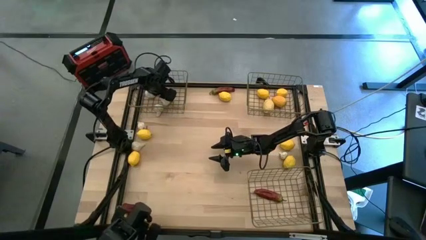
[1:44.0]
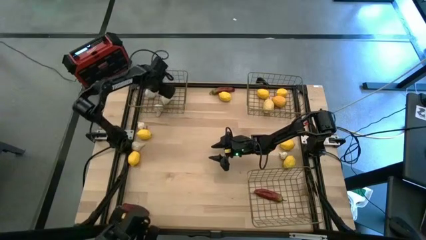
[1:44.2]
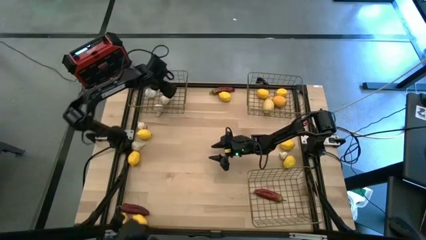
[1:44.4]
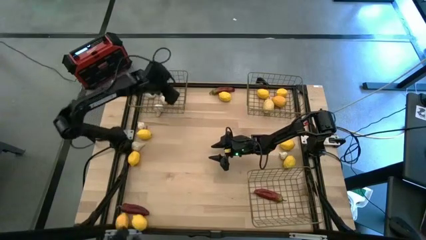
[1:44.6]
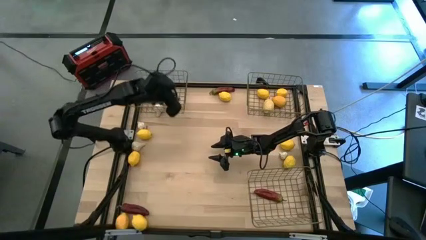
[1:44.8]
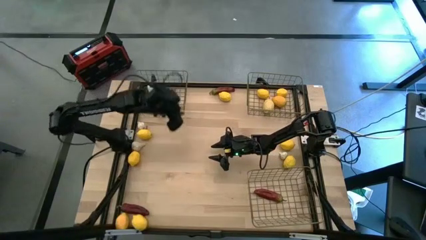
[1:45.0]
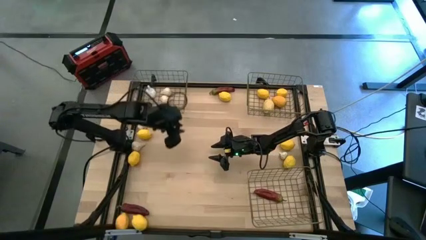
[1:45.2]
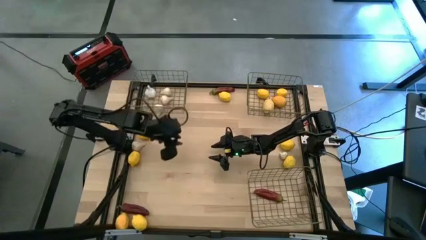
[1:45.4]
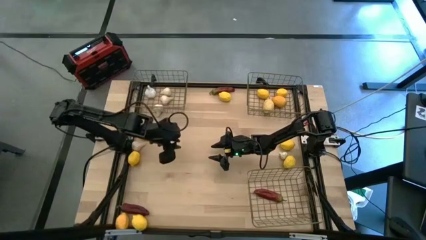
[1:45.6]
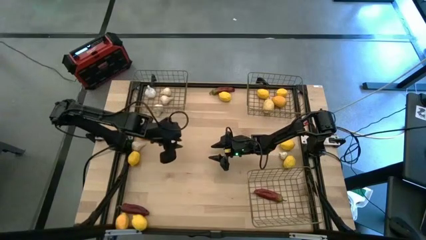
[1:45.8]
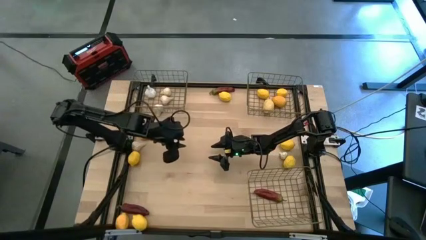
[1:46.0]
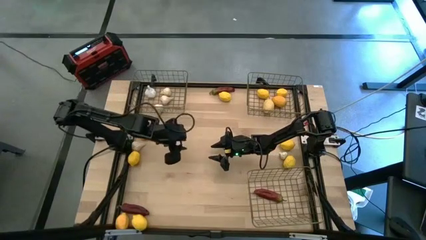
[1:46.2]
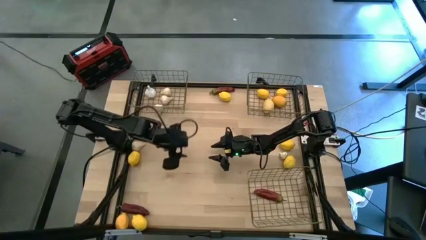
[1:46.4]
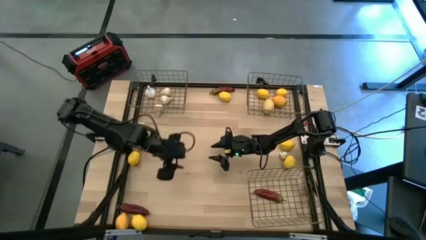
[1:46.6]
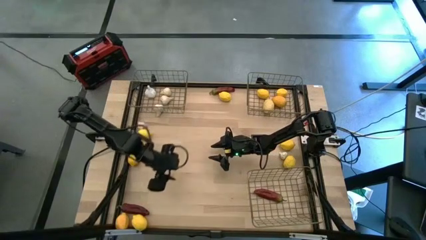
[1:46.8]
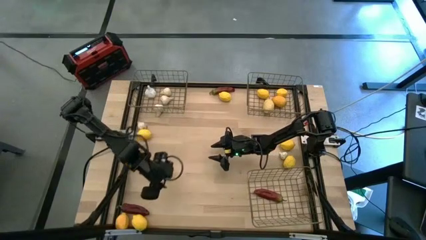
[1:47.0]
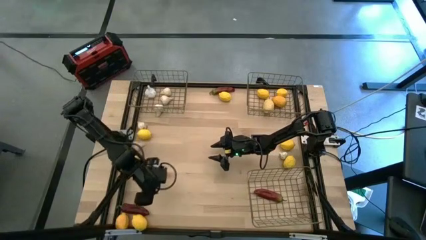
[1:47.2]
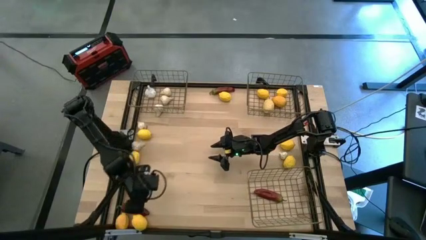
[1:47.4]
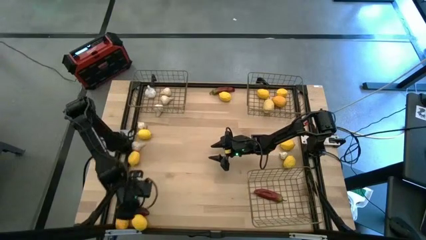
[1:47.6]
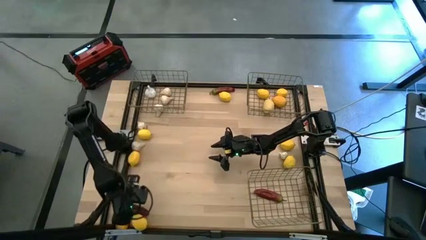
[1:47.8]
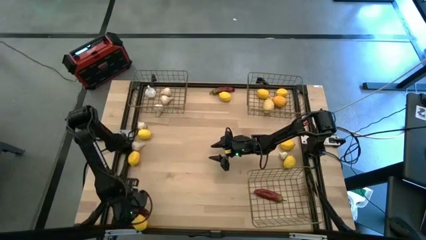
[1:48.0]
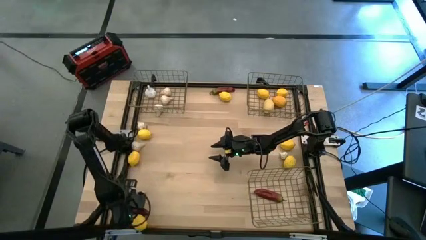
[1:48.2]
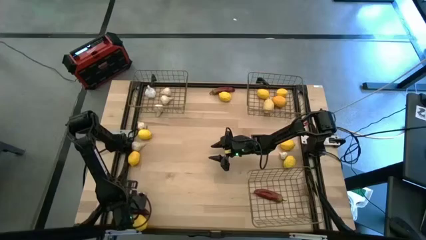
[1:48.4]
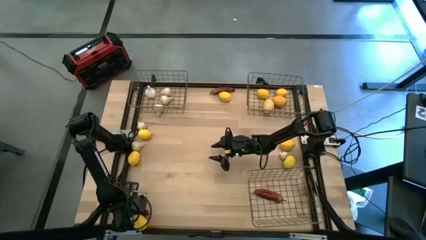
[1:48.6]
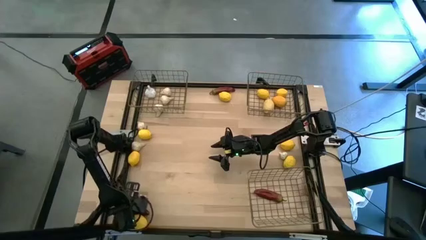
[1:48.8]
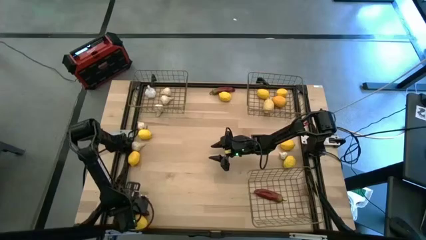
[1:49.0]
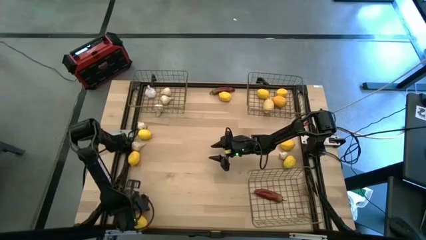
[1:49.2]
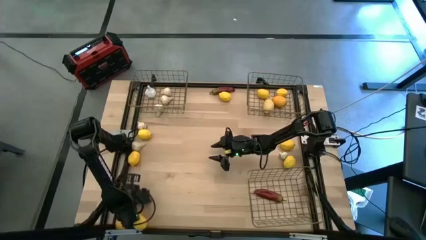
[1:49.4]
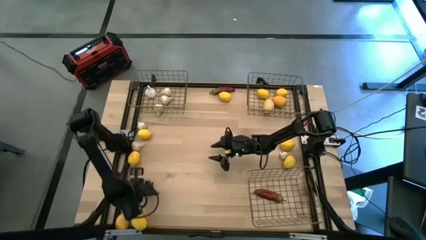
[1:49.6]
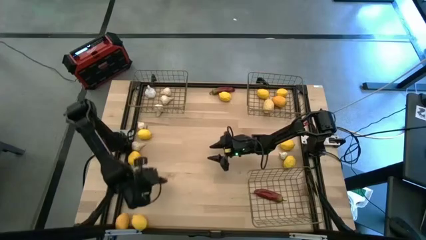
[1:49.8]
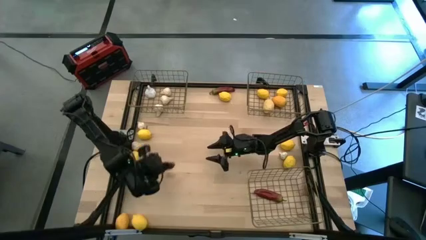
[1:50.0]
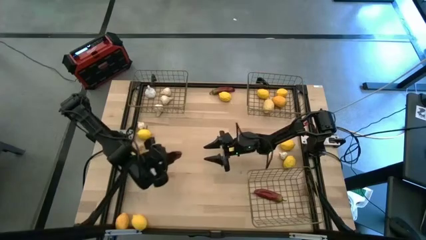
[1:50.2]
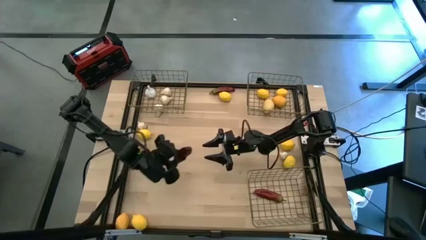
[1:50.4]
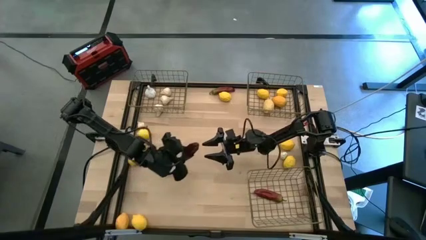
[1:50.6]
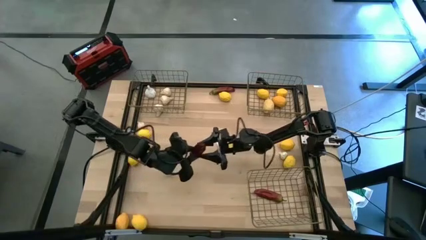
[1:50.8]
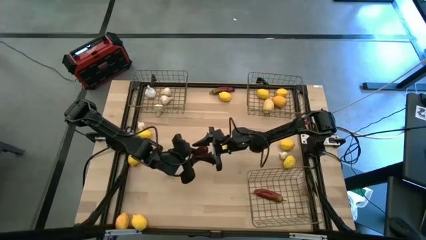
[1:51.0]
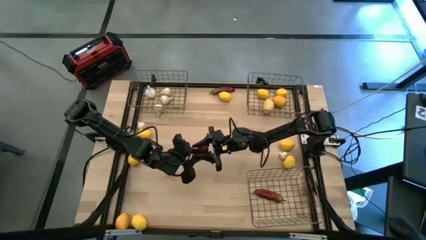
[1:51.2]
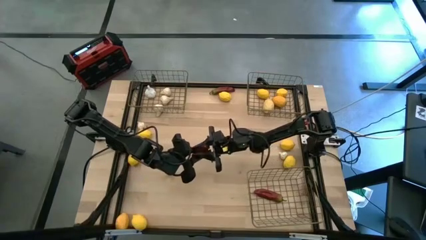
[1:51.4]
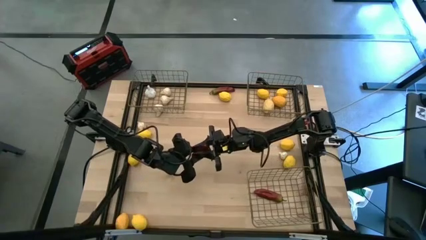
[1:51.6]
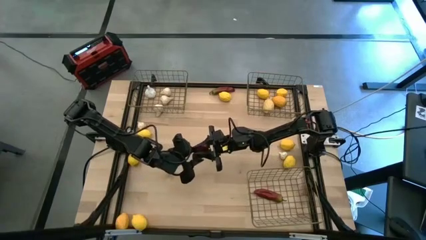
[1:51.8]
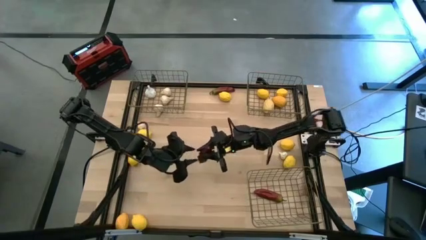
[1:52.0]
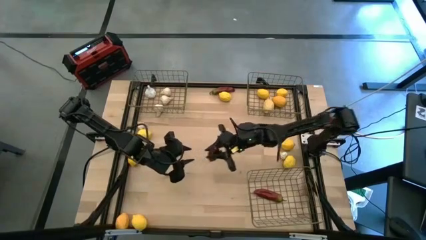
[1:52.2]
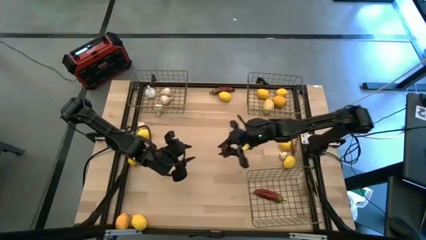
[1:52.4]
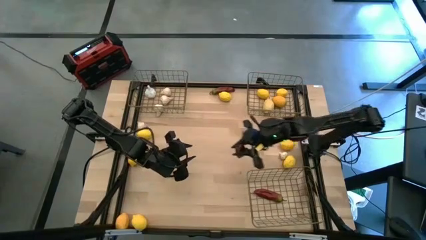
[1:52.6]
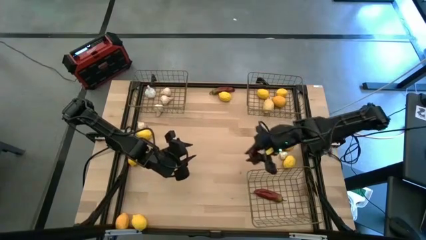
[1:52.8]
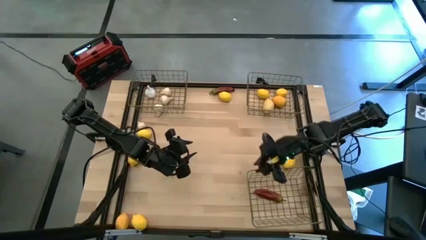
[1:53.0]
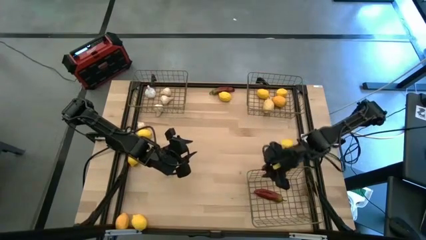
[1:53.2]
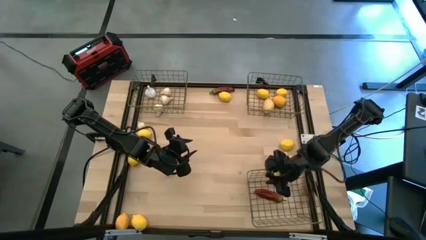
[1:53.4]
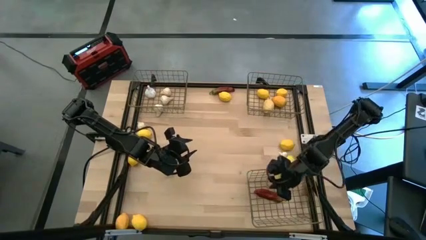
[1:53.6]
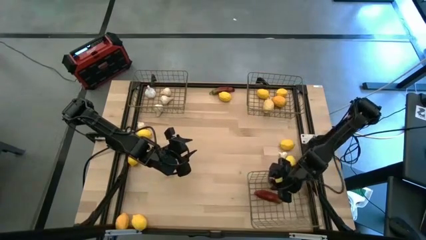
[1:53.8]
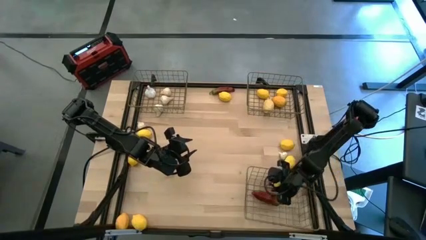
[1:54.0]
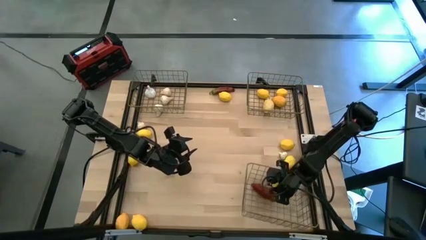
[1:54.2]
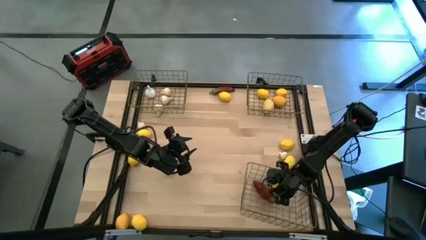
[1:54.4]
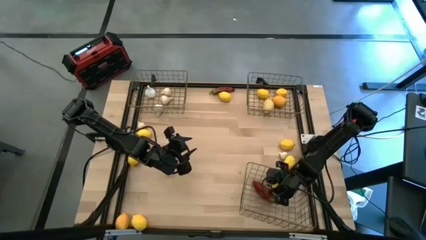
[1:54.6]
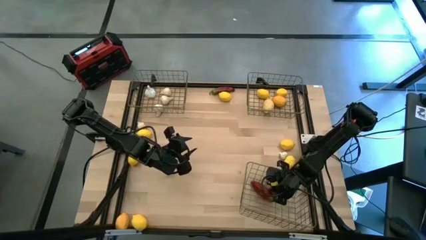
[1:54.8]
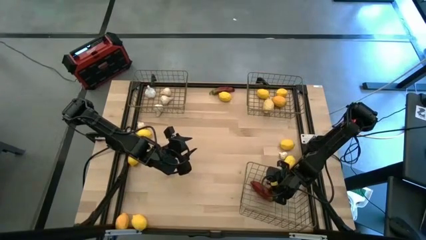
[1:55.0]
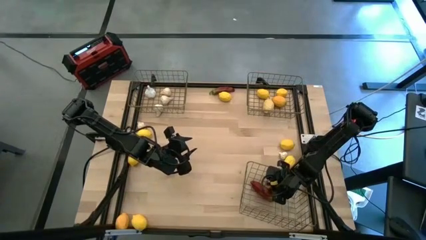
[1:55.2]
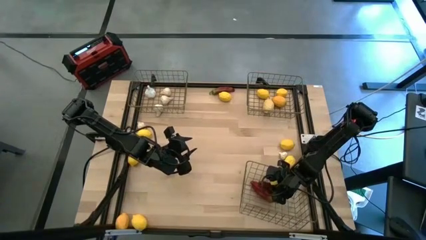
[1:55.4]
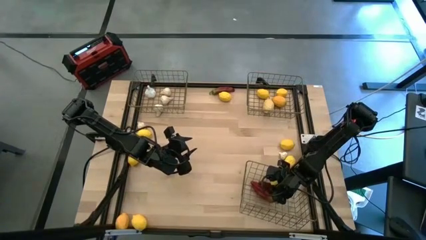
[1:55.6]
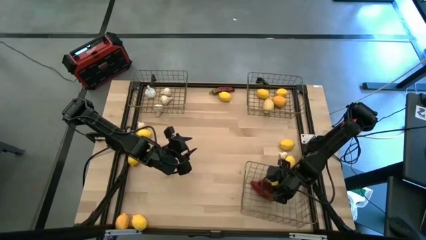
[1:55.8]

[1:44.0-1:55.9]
Task: Sort produce into baskets
Put the red chili pepper into the bottom wire basket

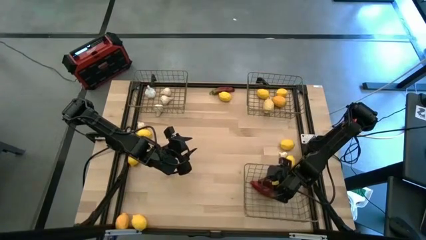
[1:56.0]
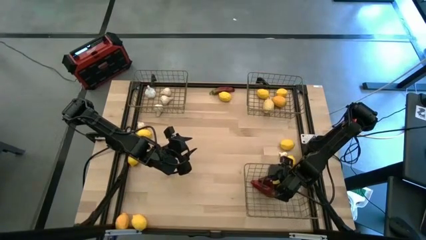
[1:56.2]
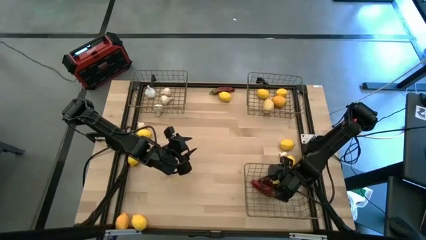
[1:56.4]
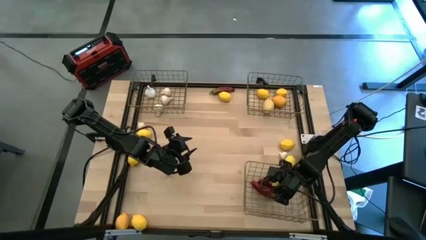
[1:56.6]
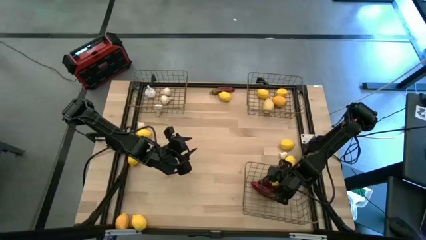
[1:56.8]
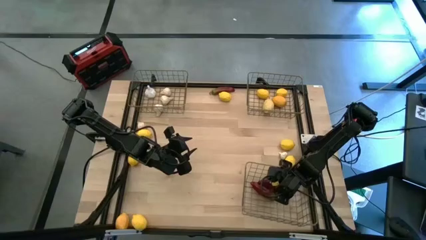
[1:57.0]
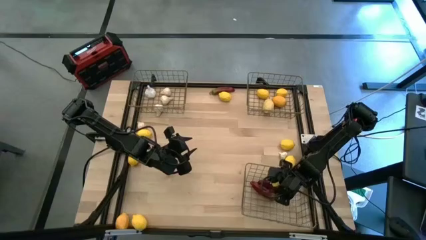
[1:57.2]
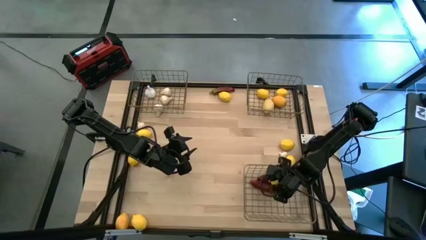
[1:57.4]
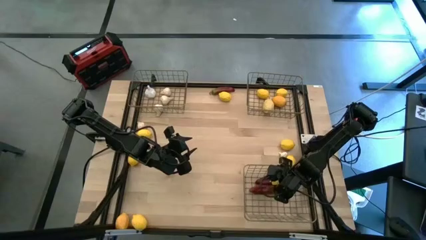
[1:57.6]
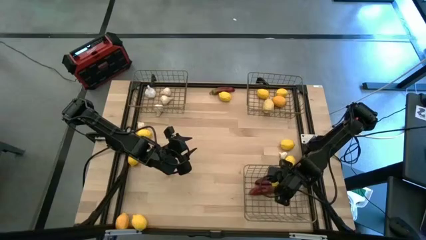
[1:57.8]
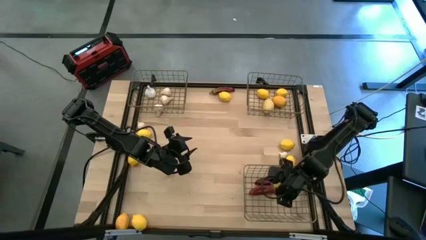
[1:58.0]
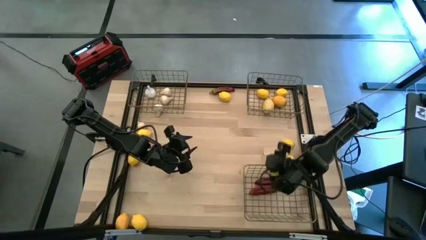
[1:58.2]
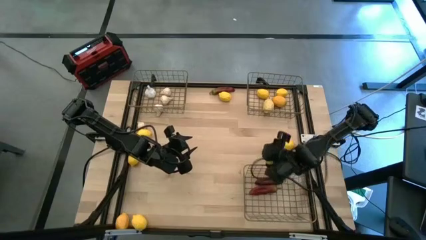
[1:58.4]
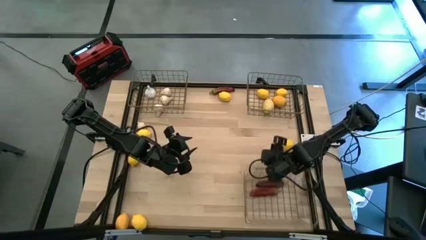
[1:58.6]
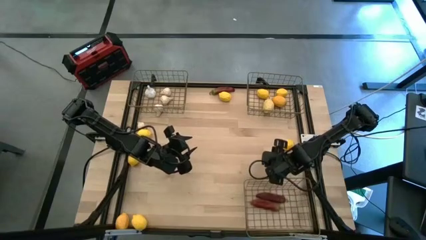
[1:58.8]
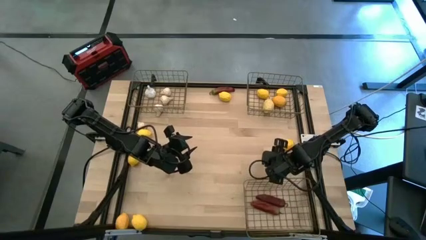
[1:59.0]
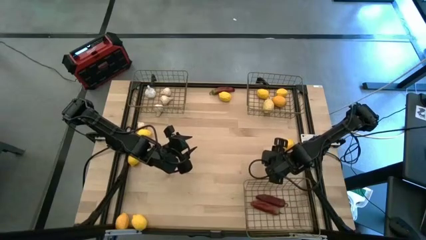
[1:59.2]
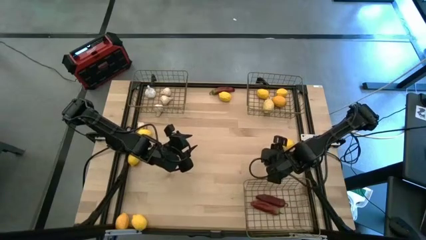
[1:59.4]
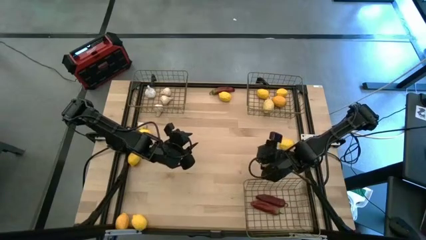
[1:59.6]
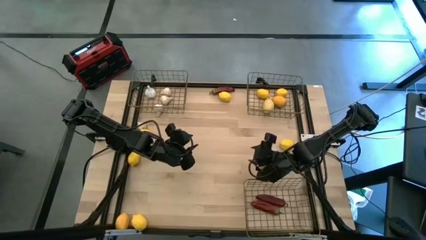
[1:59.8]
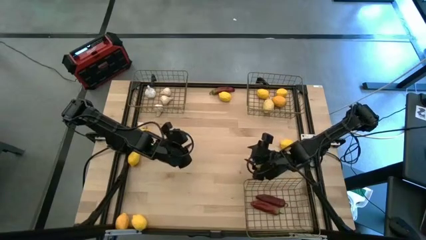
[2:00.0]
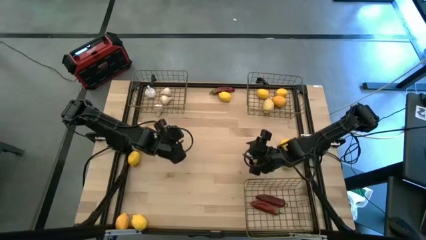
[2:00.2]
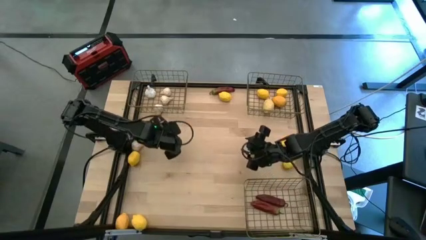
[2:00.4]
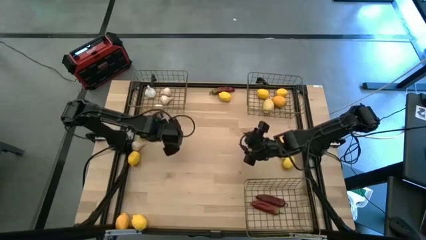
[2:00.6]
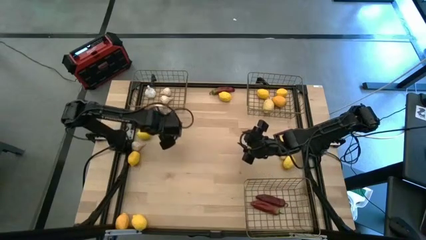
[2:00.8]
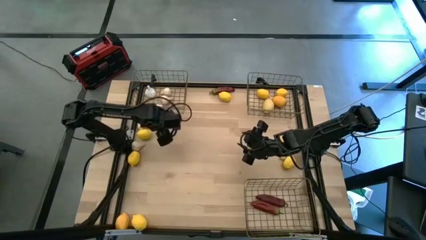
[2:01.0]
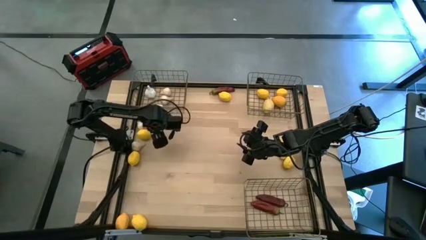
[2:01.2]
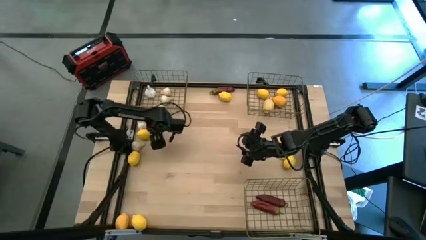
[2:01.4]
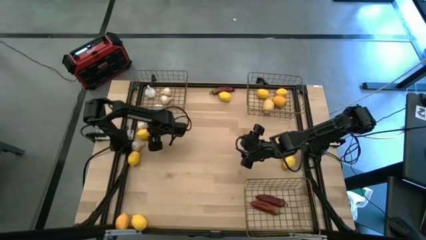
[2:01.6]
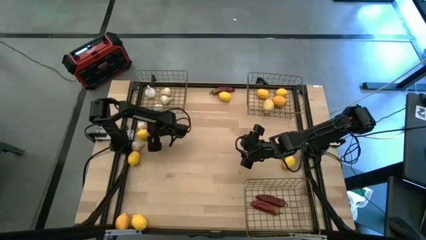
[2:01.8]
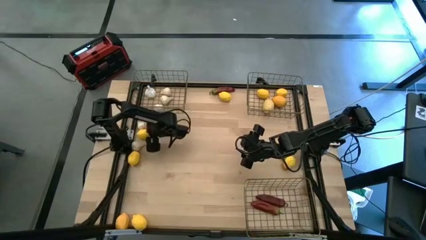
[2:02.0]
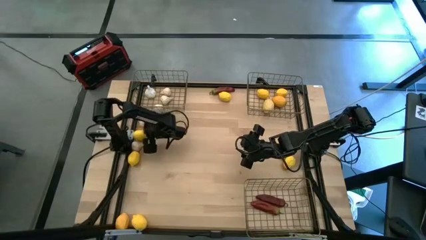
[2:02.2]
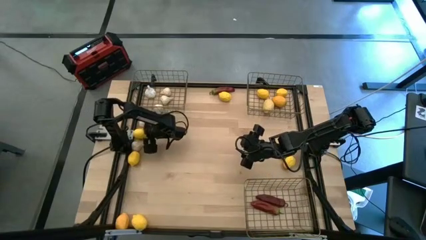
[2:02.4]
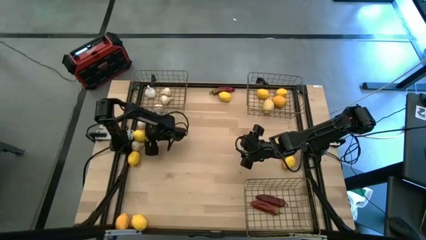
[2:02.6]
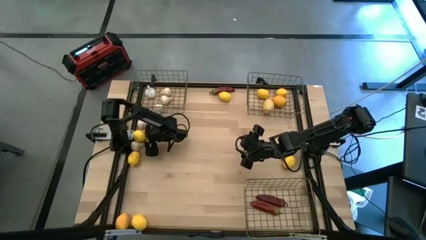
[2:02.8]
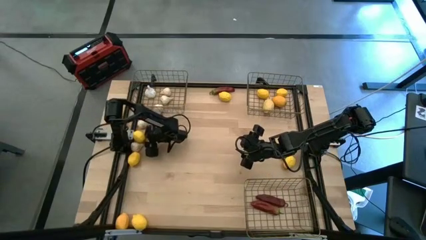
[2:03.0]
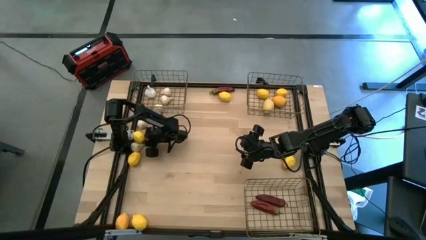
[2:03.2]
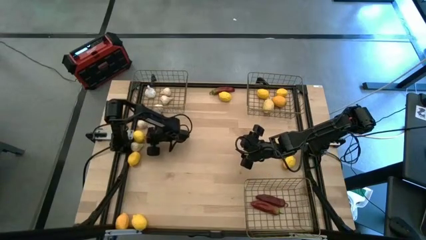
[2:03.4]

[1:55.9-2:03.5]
Put the yellow lemon into the top right wire basket
